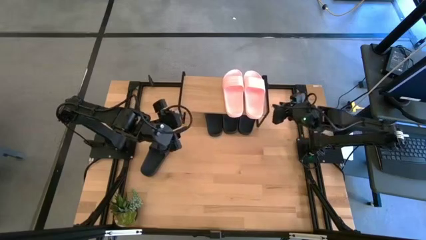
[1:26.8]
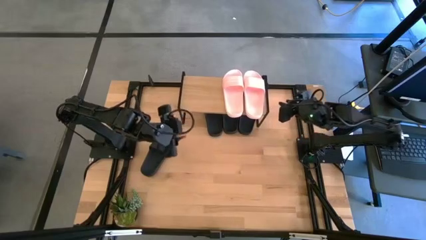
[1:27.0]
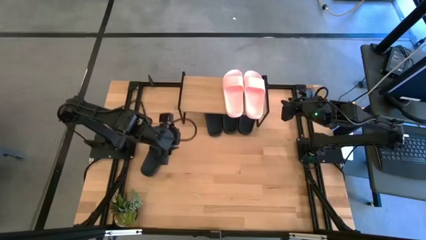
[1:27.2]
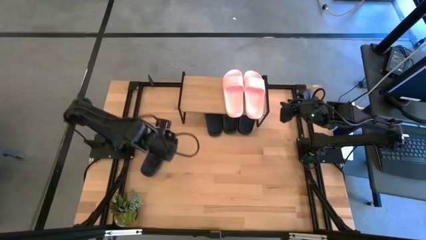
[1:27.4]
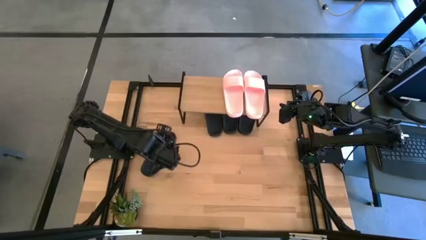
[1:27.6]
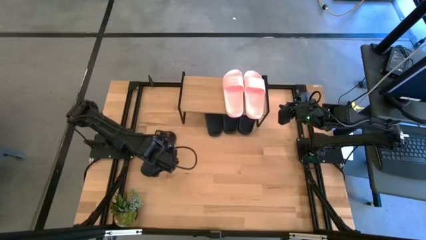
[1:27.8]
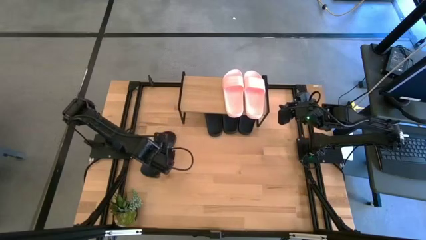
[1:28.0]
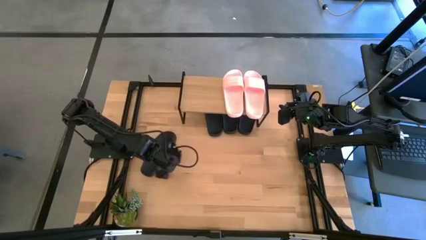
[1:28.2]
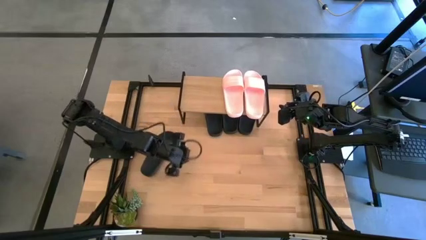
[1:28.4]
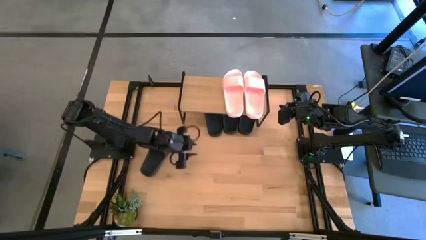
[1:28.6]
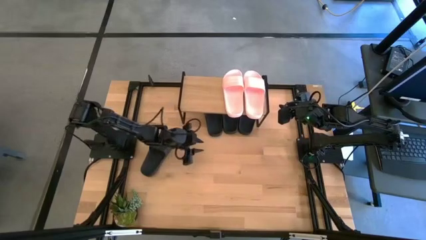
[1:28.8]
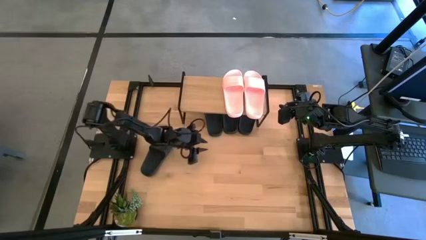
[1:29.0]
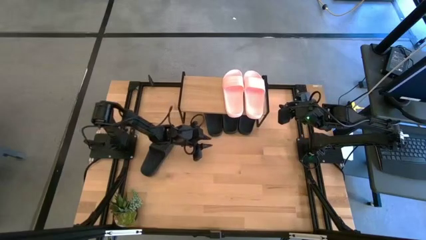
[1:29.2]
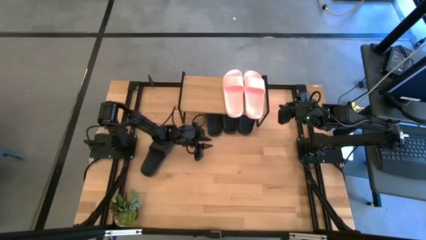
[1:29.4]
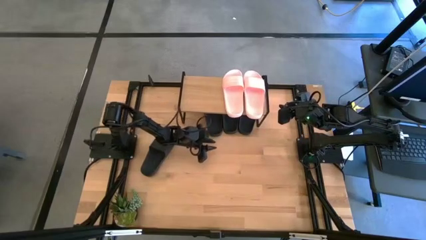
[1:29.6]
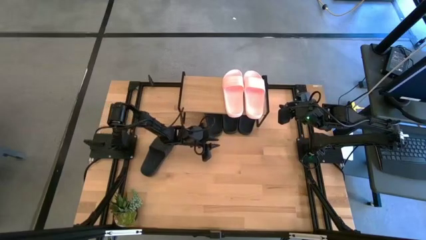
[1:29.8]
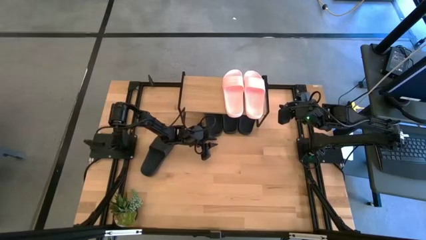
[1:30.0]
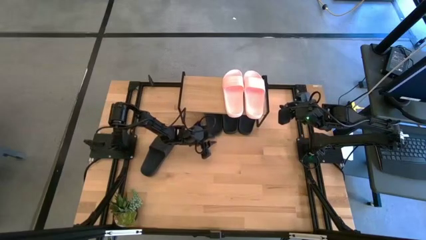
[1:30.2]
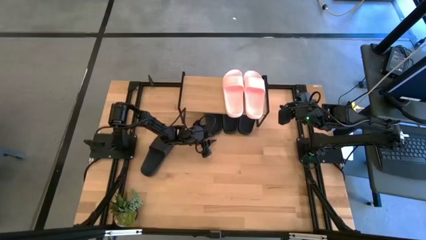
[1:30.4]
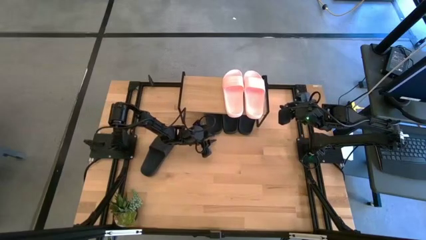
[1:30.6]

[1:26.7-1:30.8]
Task: Pick and place slides into the shelf
Adjust the left black slide under the shelf

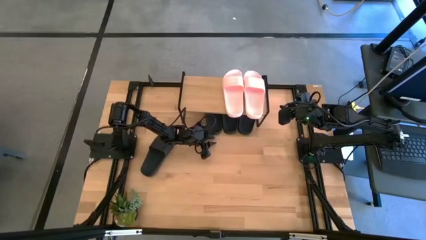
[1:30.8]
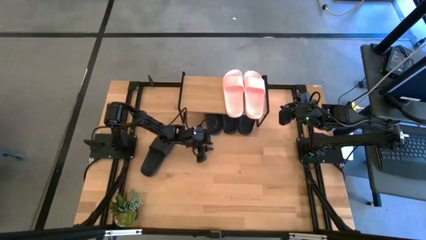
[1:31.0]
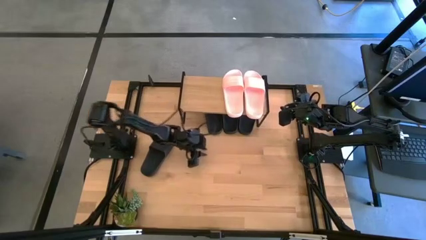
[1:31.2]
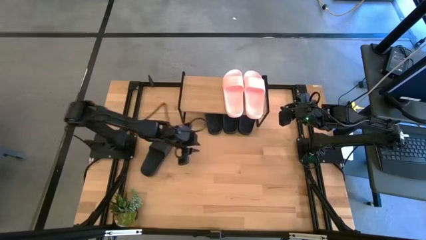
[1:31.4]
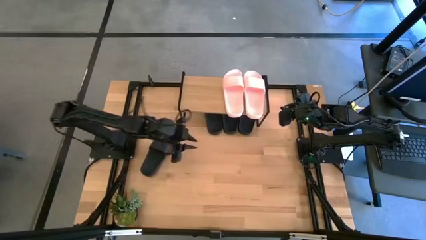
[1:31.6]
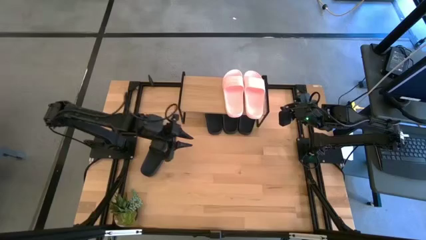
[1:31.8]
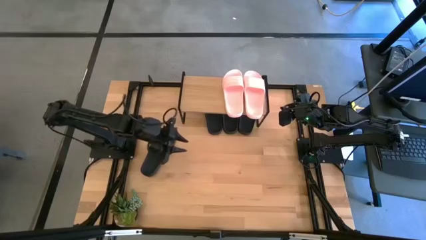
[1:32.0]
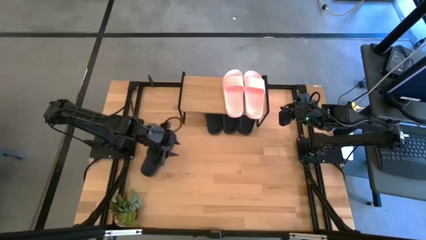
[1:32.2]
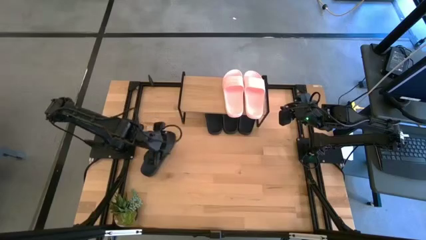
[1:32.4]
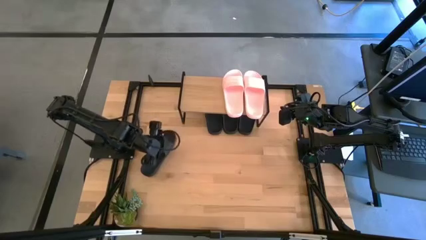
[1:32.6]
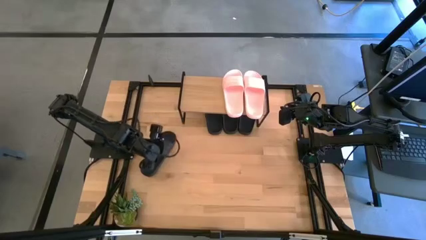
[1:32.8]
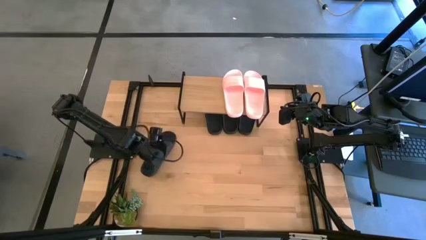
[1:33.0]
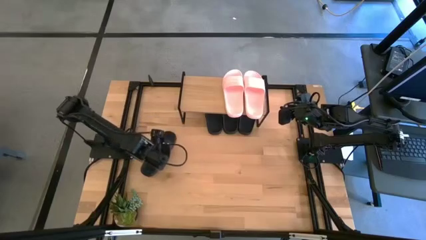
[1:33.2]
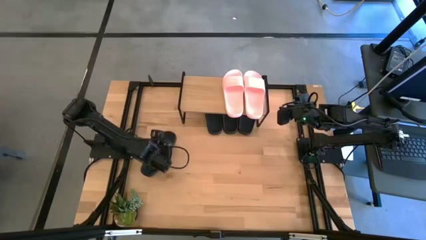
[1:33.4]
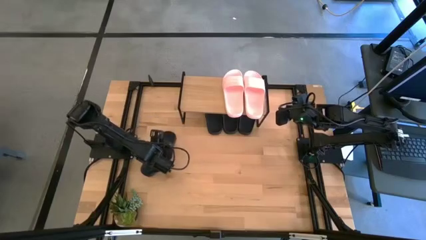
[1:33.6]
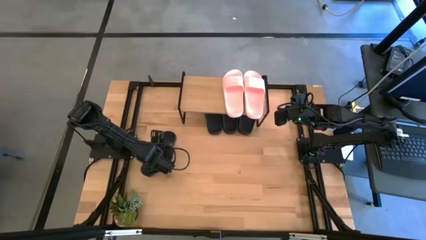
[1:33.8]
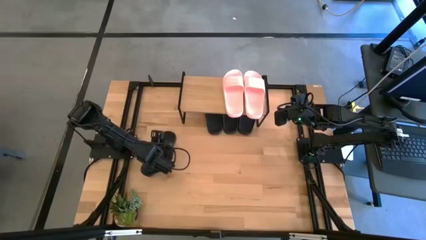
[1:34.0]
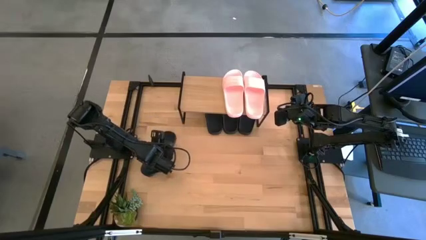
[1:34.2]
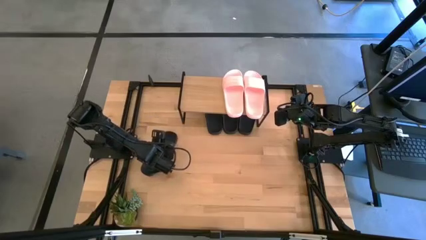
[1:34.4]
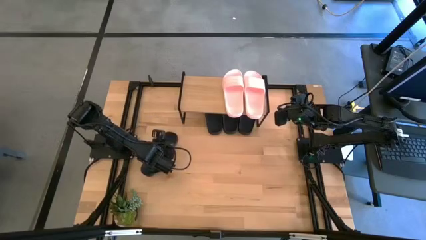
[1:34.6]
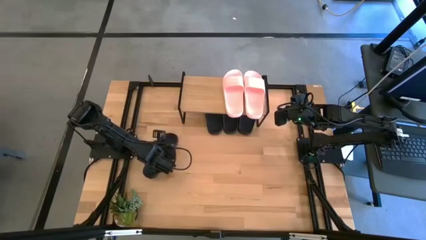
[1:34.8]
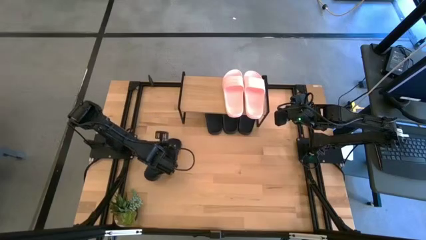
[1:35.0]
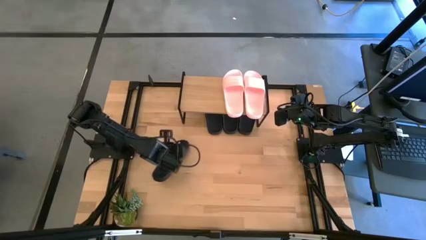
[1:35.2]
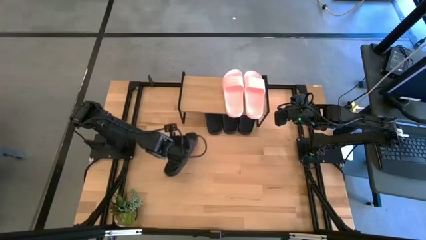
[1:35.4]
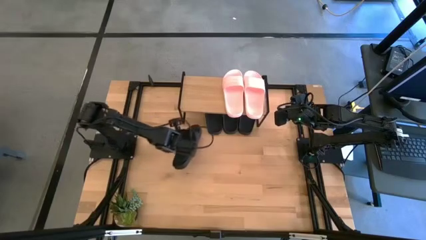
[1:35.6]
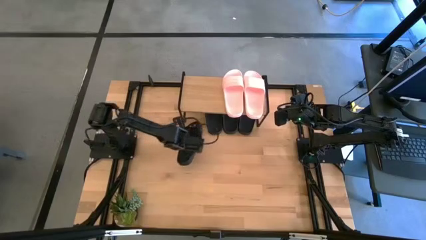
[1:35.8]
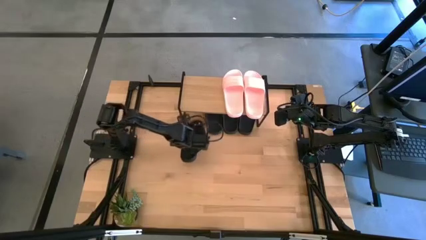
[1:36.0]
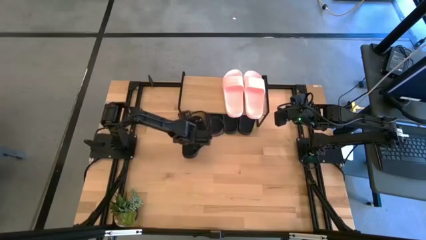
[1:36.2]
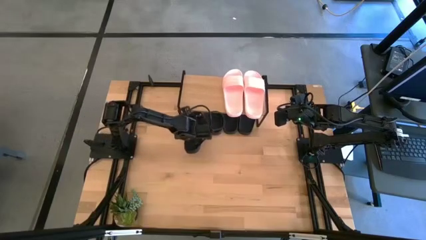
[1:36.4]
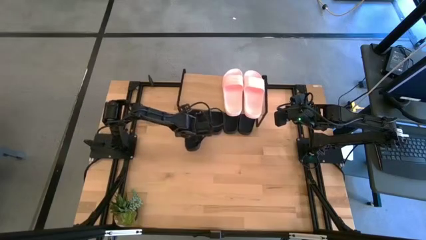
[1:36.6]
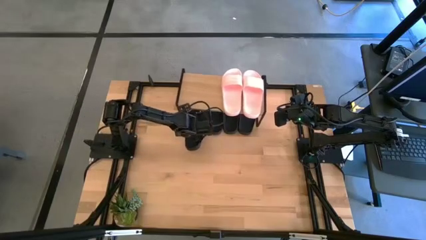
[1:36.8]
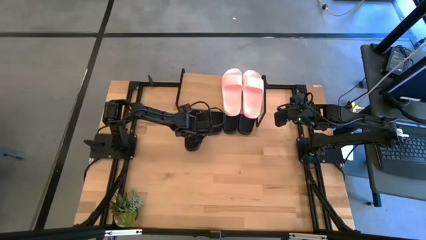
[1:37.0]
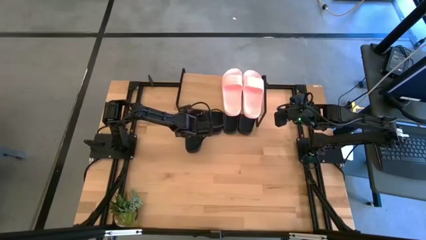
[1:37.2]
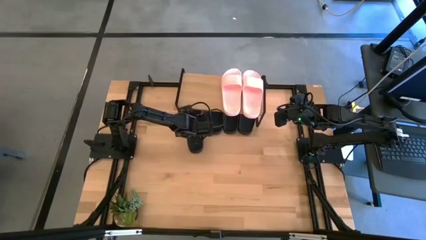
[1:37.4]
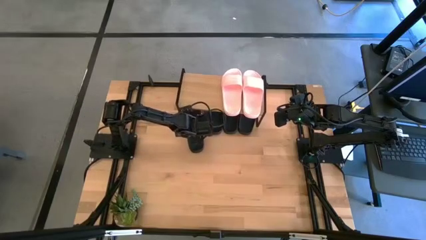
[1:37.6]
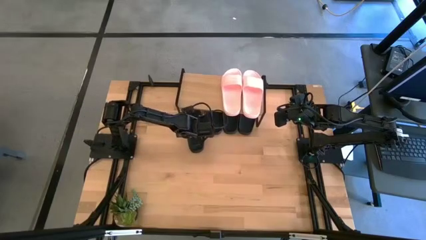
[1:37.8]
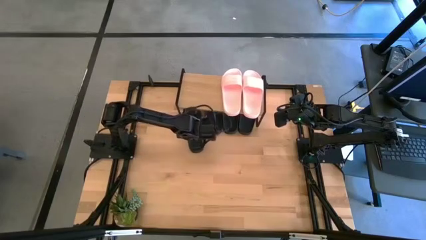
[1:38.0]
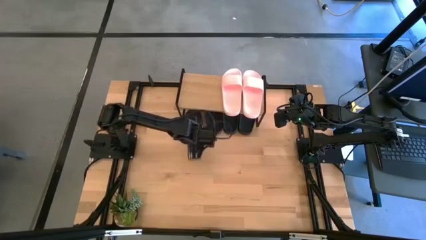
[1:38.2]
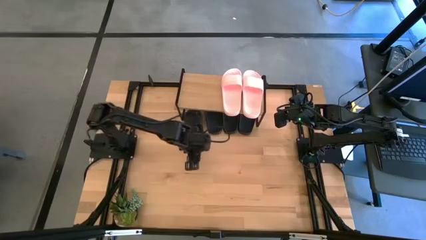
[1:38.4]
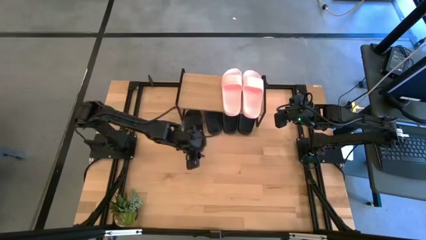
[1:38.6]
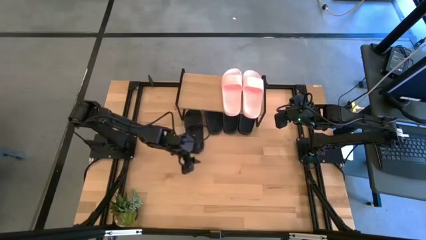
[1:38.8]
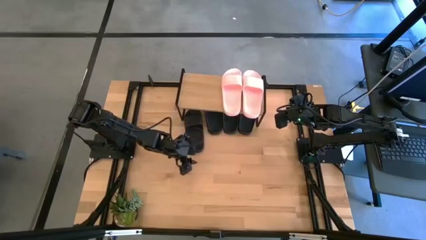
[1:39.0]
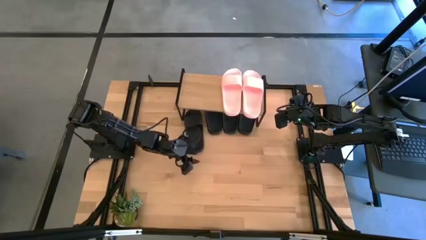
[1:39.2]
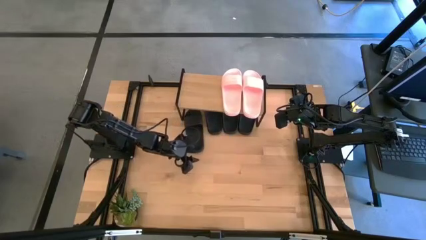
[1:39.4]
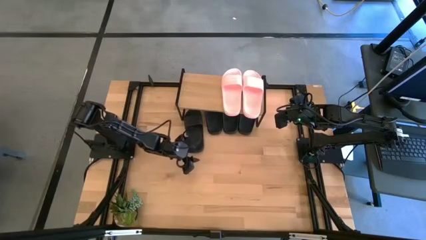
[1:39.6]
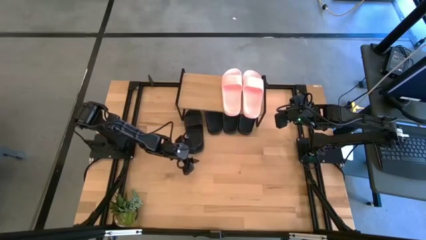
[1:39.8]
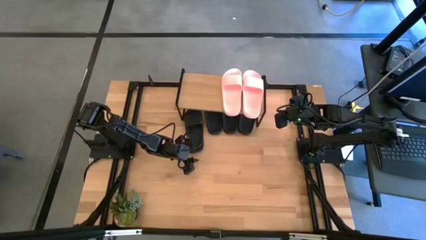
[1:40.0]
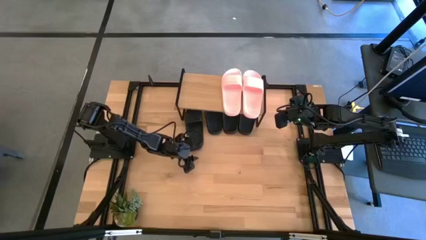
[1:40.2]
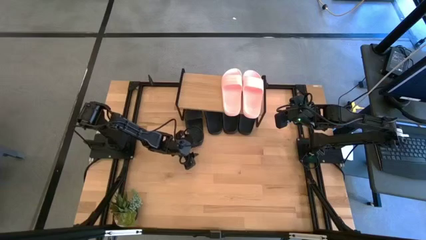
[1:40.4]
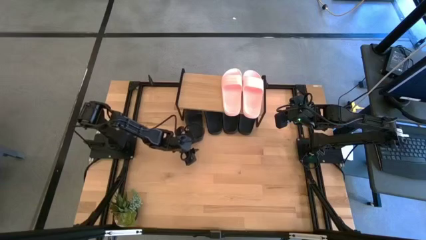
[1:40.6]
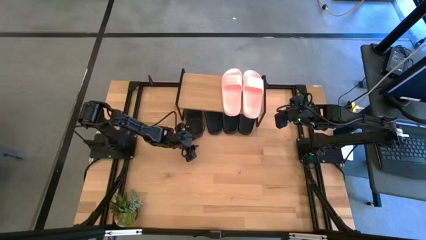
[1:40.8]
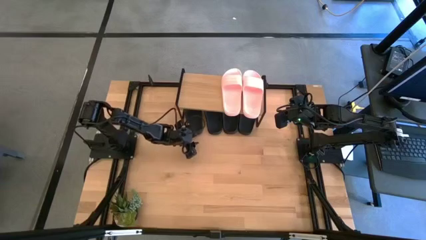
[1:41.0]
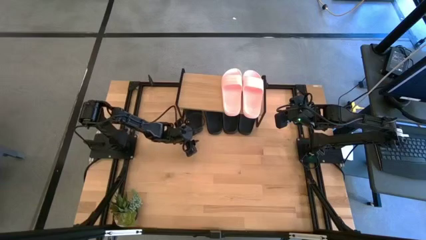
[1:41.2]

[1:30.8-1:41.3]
Put the black slide under the shelf
